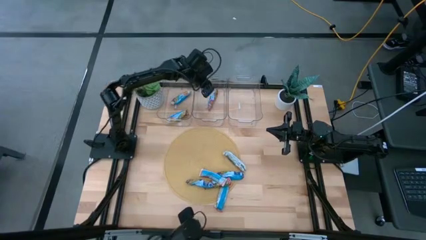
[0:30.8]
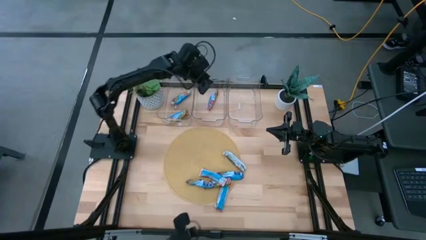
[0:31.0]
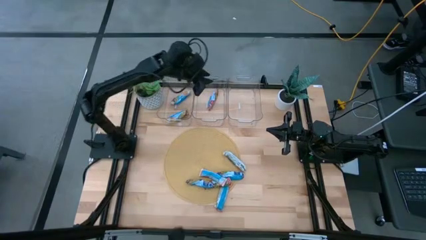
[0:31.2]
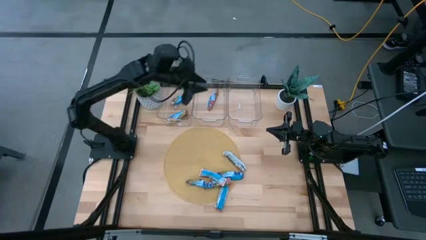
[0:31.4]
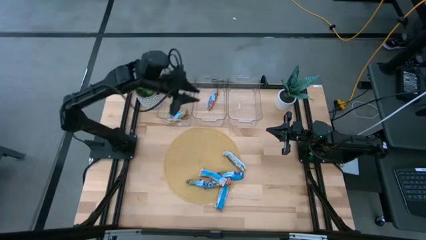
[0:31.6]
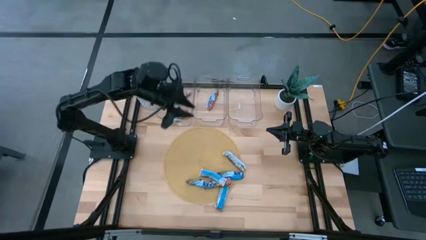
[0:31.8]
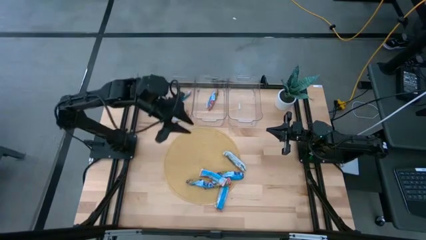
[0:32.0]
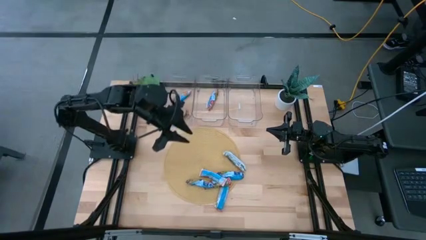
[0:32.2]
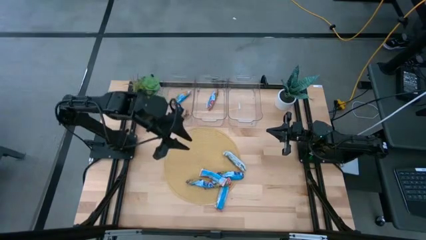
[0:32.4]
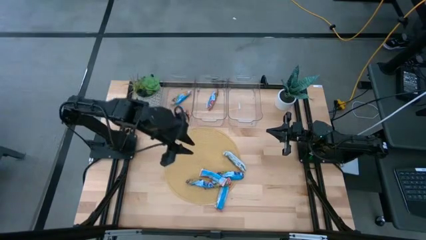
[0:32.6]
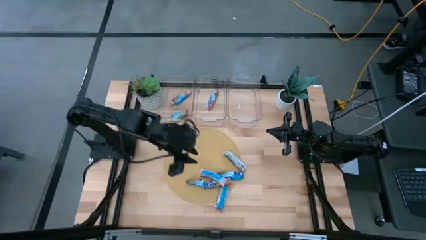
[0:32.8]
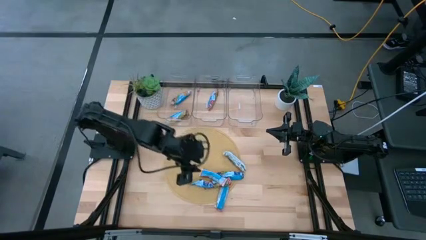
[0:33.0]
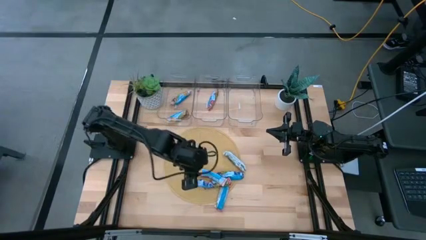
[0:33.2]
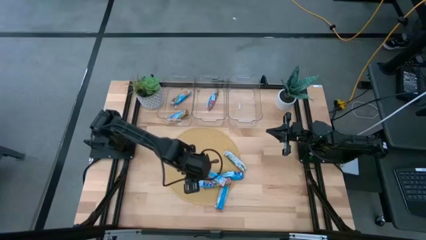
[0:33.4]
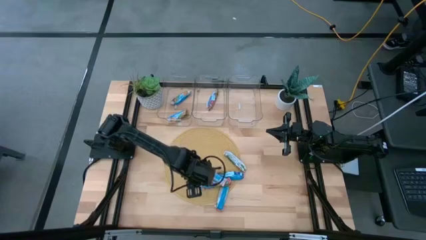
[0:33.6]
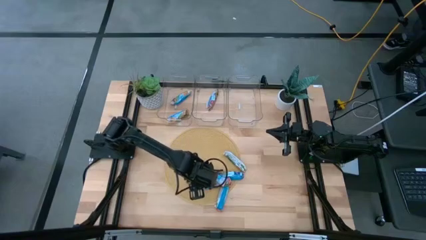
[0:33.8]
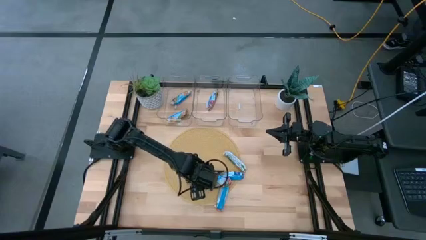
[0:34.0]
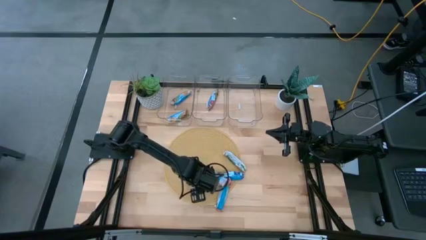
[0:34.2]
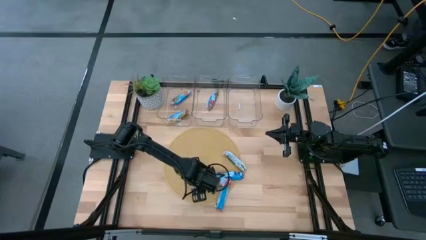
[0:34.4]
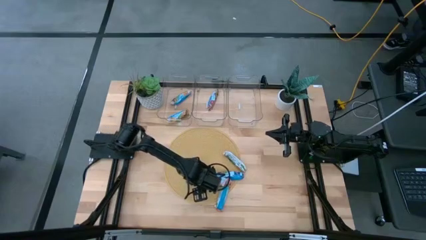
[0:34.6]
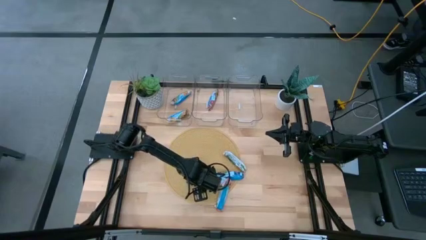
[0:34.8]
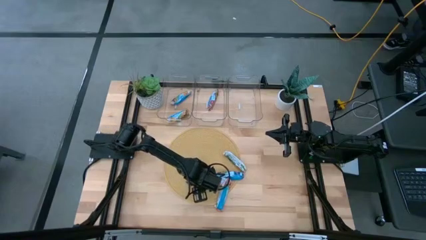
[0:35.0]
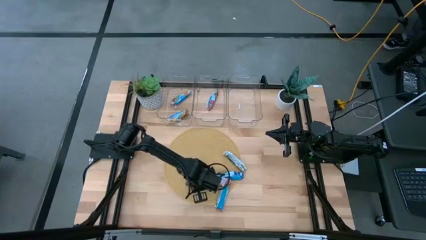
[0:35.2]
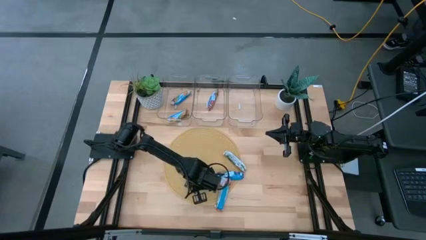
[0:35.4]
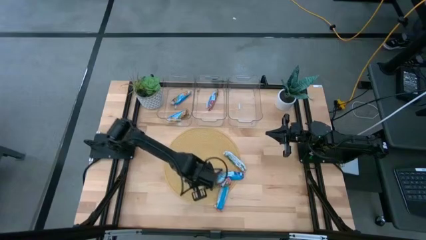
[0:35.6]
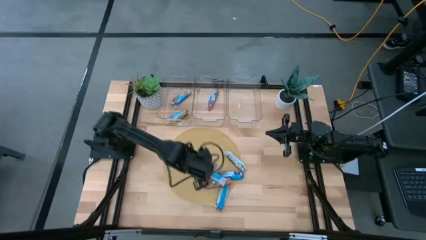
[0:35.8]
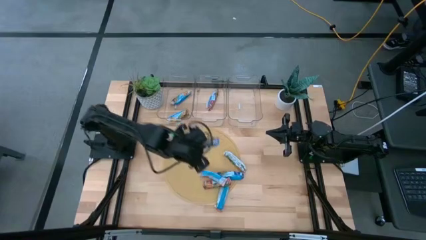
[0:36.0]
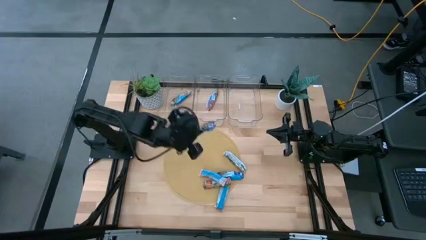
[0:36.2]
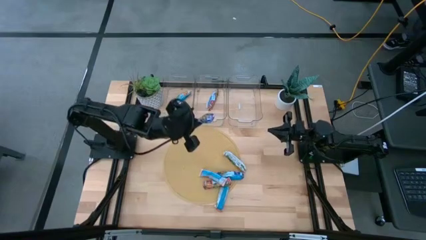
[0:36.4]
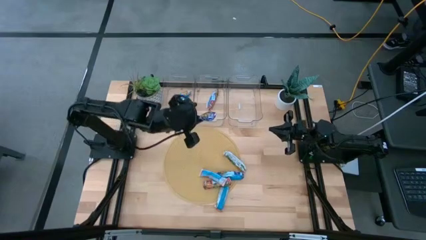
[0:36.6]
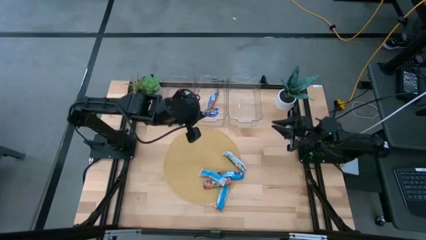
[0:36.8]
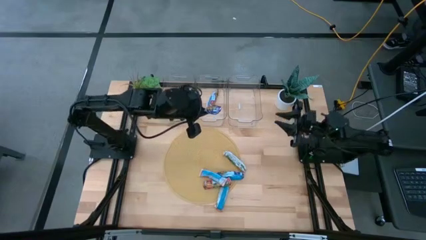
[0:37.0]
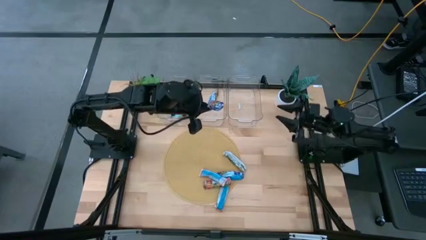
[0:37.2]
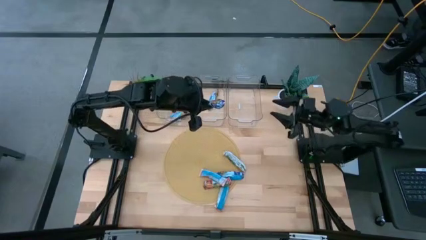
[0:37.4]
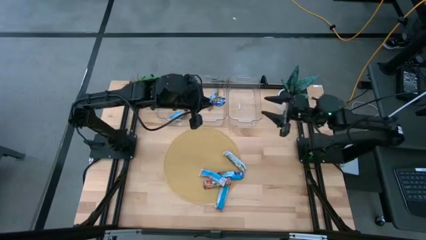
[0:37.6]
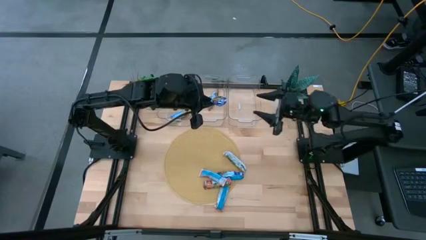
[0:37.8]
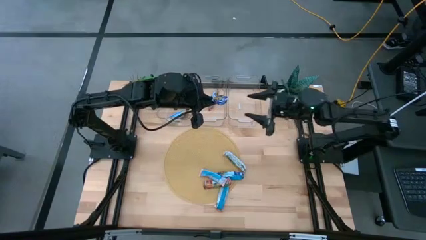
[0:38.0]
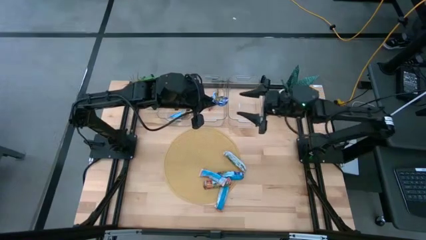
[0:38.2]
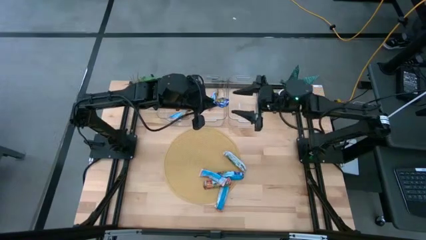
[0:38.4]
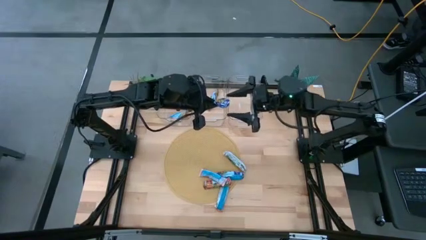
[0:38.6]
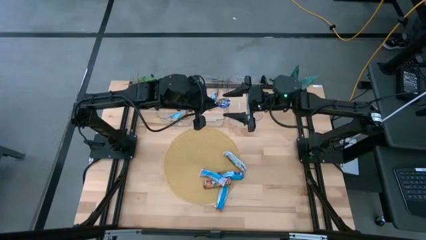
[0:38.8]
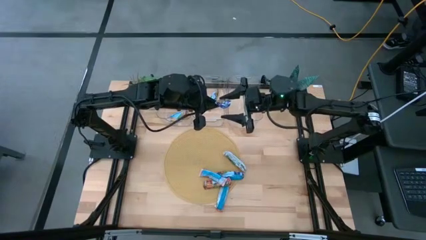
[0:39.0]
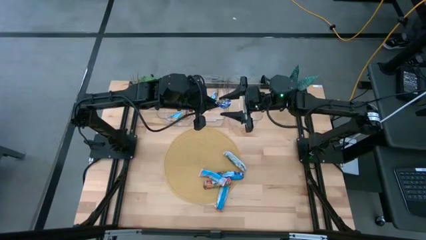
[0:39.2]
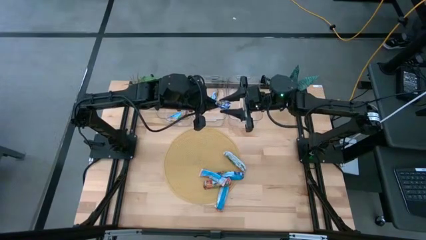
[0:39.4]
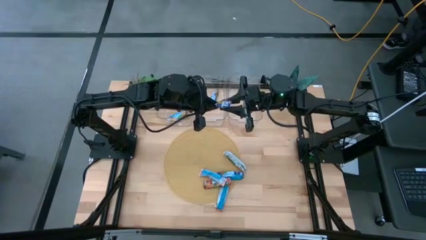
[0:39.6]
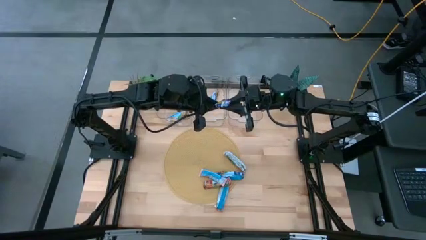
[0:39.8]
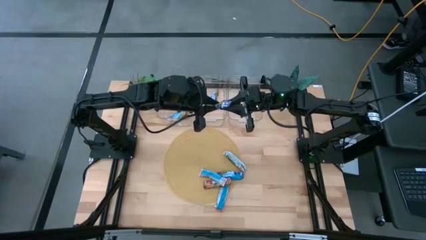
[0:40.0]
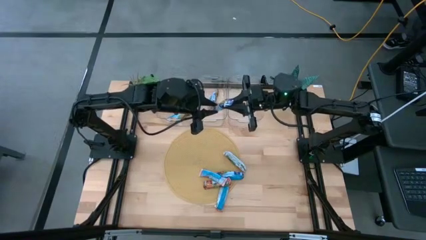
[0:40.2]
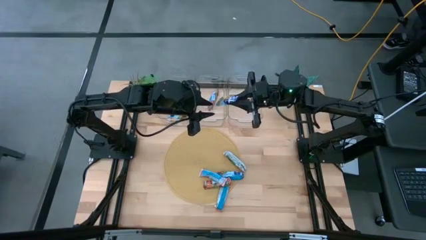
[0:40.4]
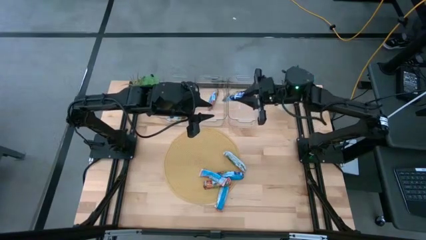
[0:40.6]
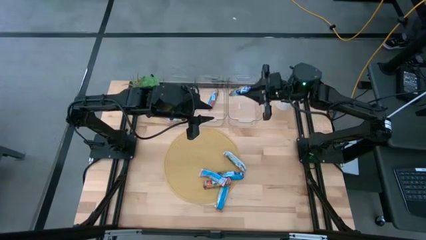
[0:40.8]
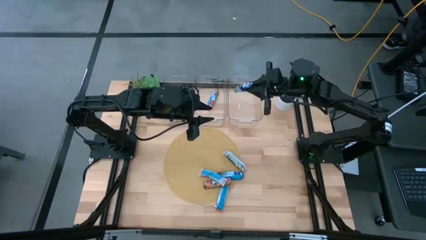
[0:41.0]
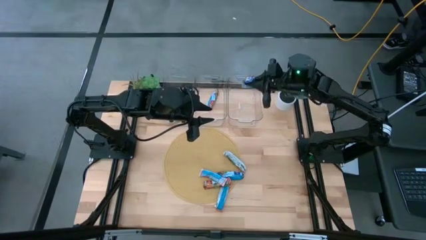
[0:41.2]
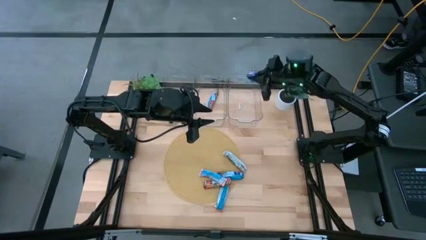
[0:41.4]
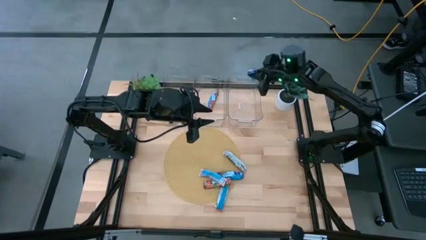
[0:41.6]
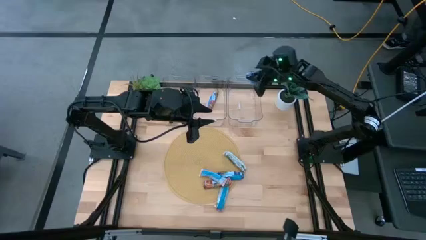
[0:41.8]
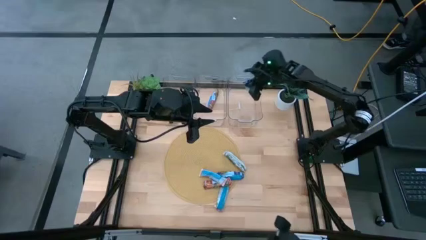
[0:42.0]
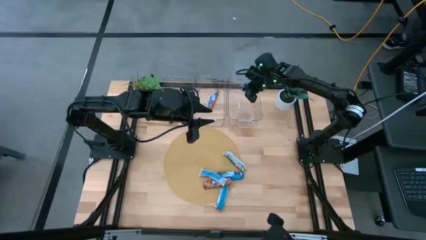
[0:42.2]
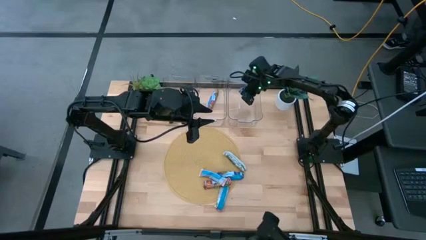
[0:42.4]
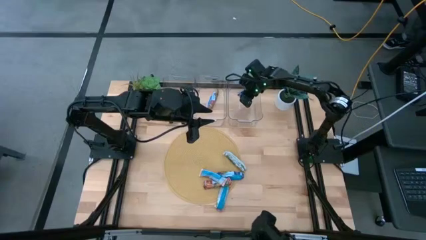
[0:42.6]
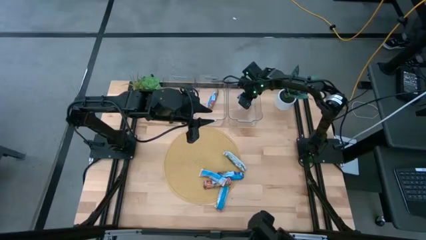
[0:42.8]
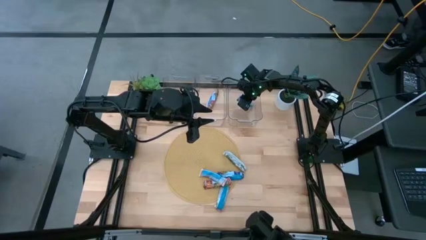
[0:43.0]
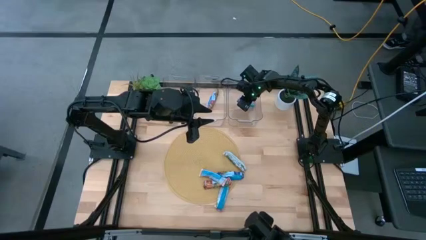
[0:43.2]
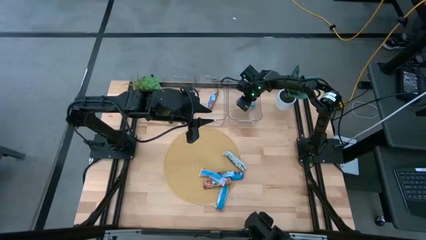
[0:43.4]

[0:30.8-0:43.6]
Task: Pick and place Granola Bars by type
Put the blue granola bar into the right transparent bin

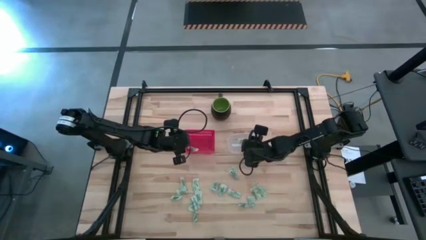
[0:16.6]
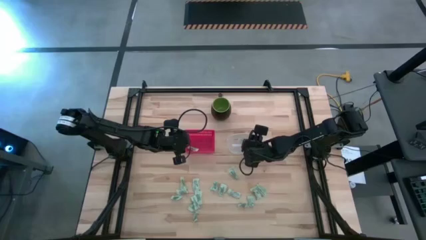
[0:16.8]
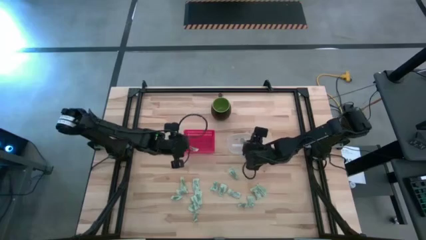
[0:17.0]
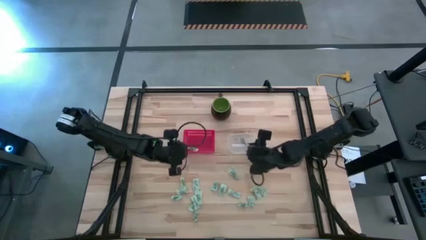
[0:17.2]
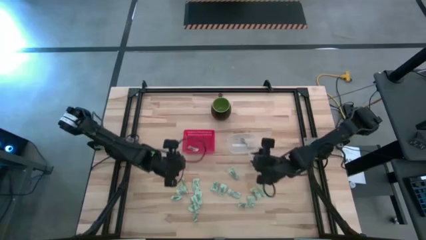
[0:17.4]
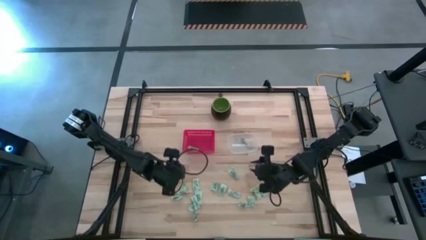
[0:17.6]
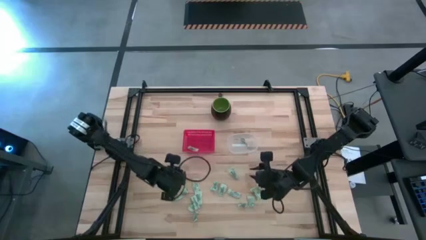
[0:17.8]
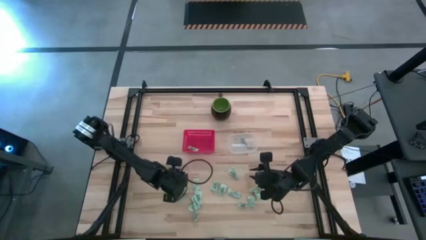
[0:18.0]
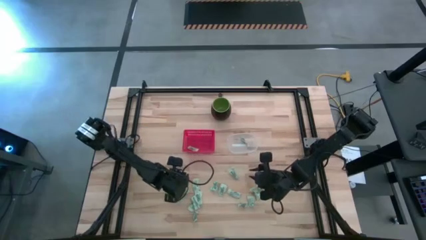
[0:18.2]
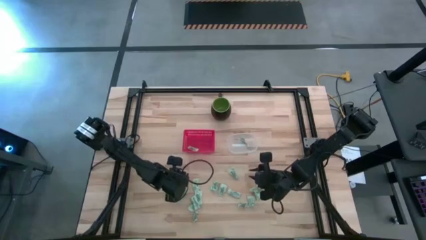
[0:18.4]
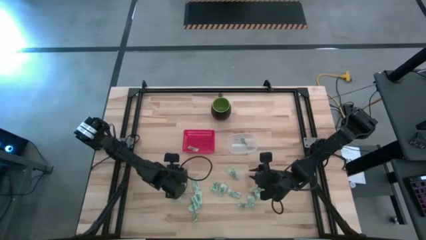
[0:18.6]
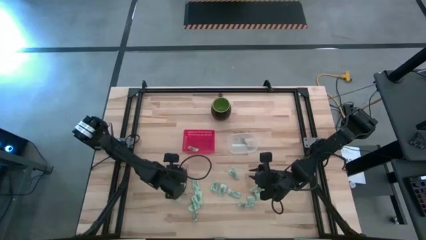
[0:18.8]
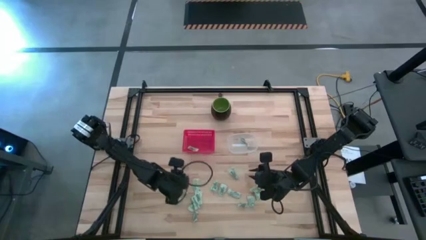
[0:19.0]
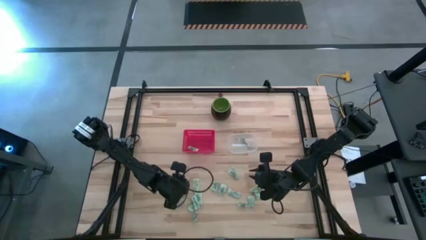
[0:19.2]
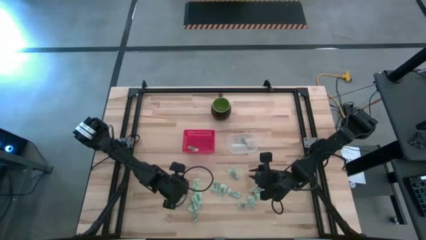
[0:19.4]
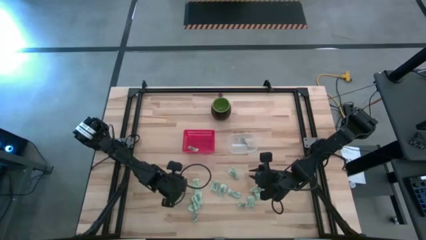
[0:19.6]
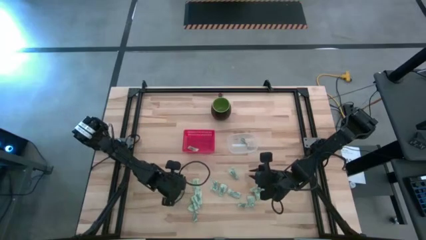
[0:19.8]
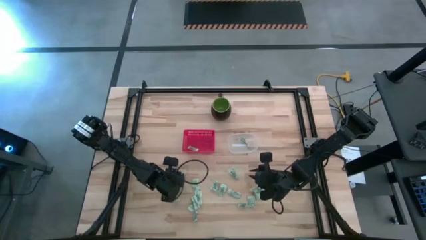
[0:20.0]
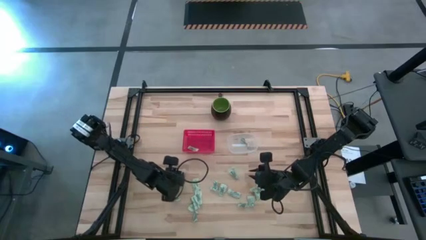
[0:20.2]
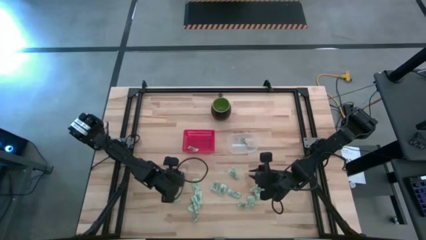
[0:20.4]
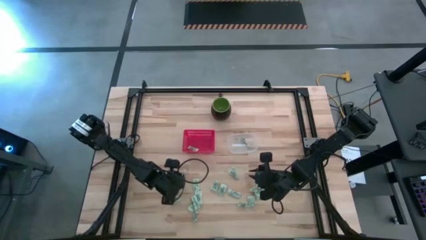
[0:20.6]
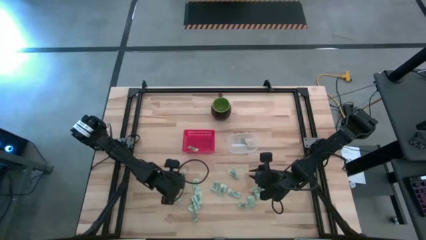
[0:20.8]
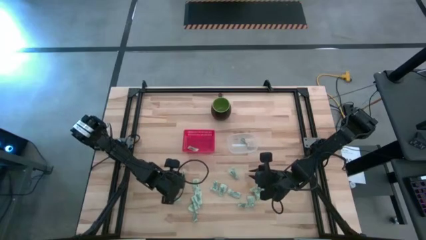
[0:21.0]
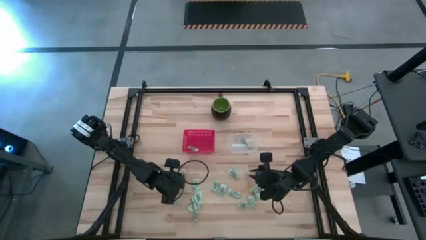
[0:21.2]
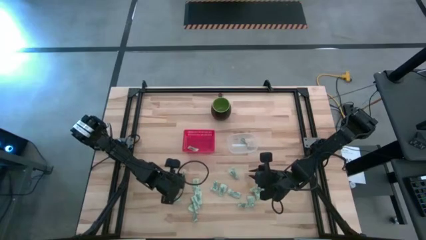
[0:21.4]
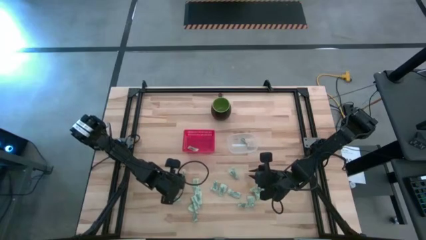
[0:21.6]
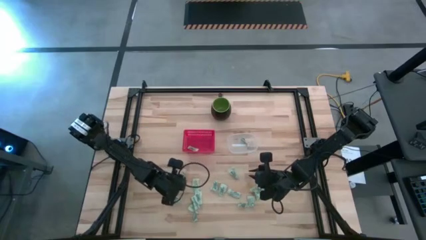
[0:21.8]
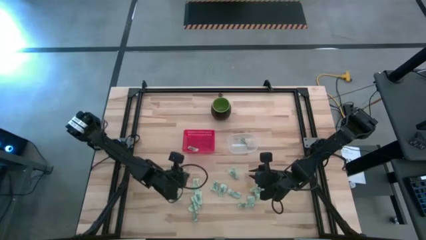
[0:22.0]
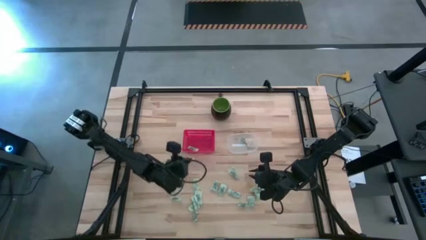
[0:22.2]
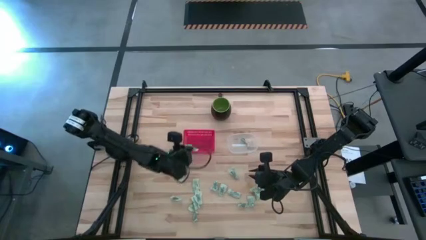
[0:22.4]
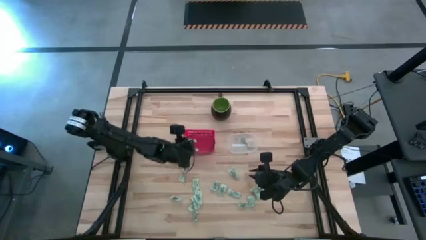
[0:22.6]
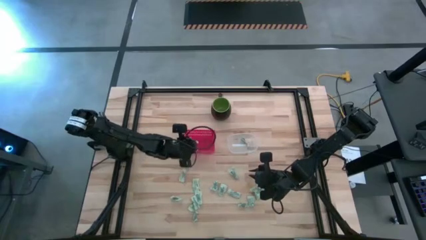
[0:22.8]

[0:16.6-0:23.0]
Task: Pick and place items into bin
Put the stevia packet into the red bin
